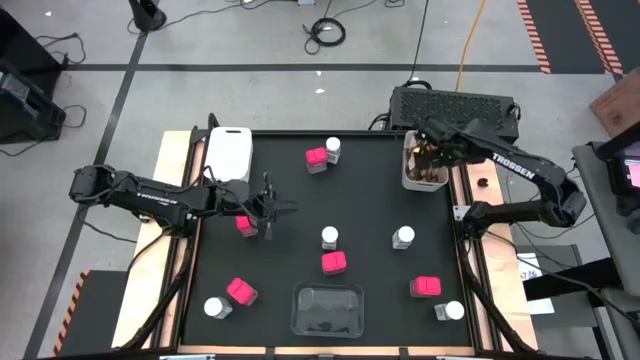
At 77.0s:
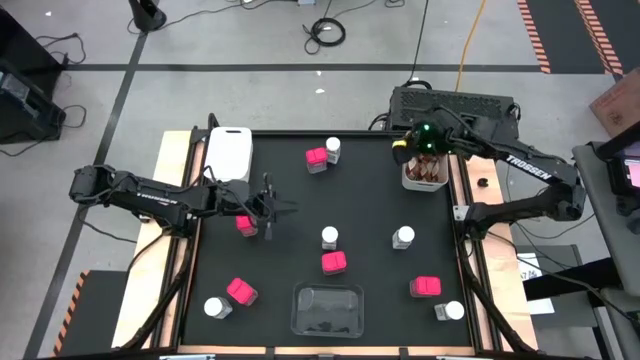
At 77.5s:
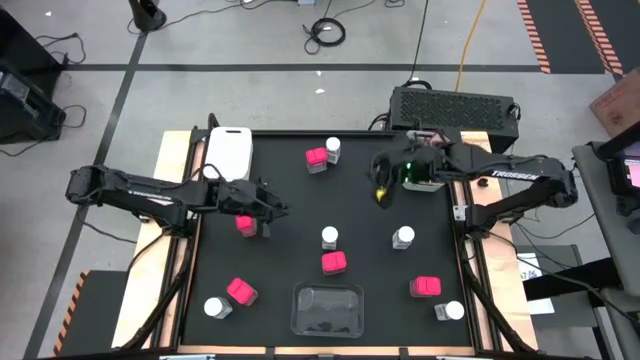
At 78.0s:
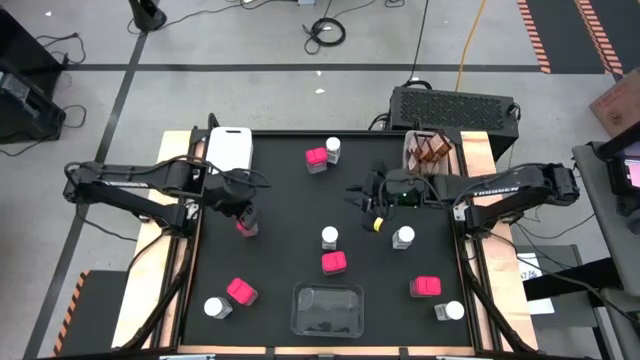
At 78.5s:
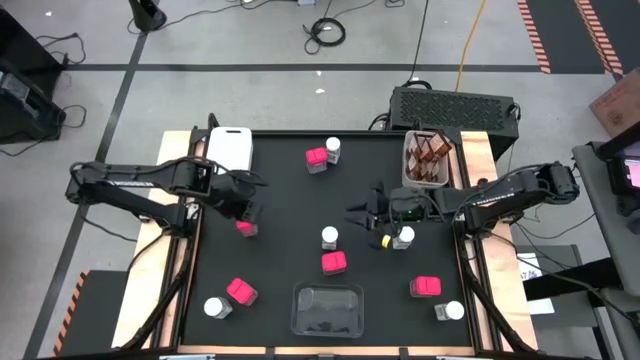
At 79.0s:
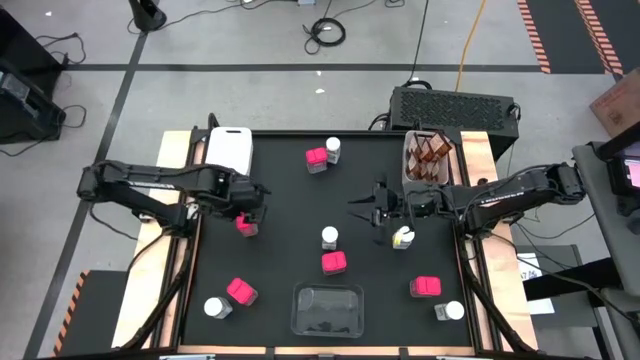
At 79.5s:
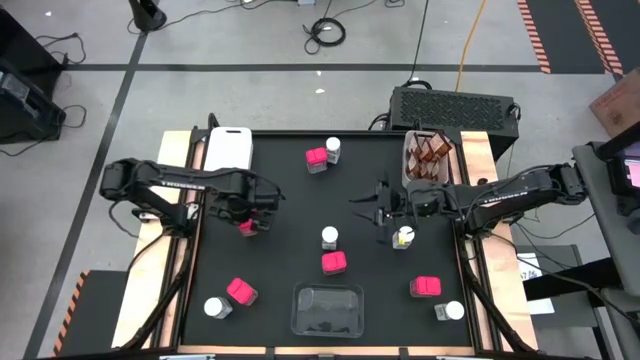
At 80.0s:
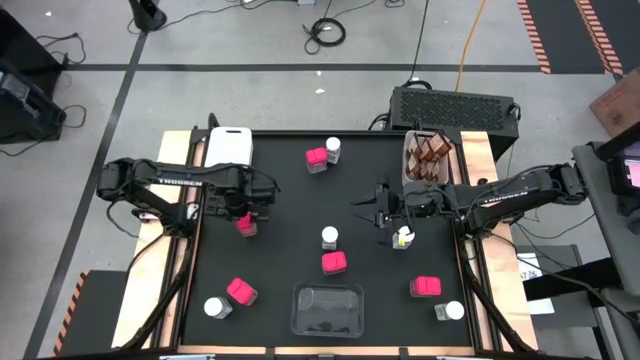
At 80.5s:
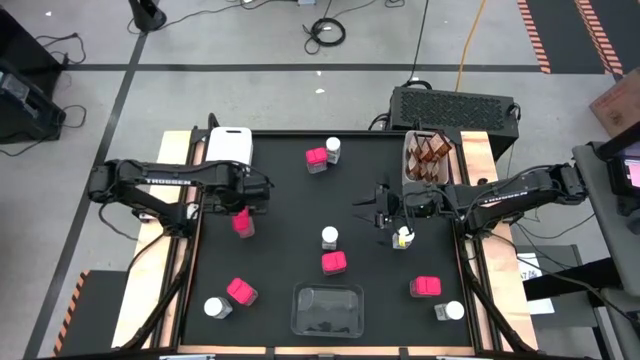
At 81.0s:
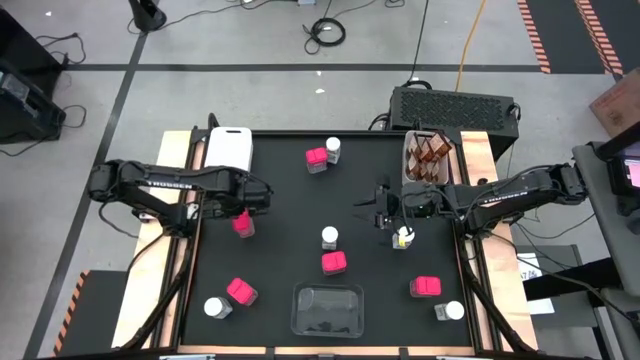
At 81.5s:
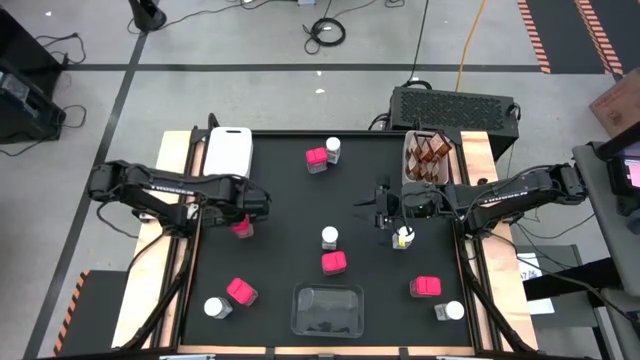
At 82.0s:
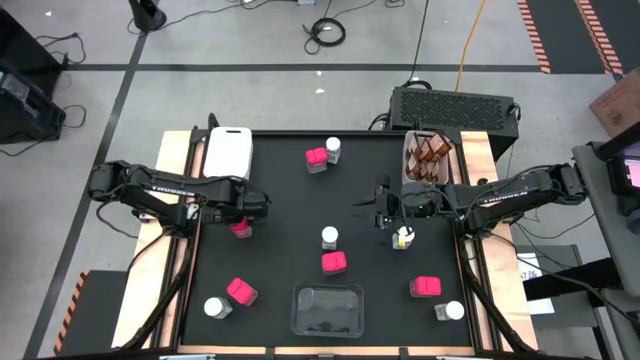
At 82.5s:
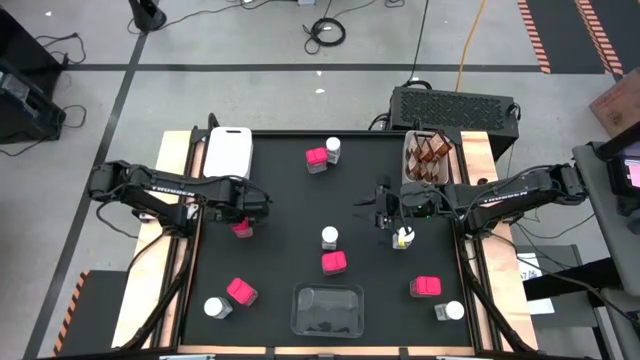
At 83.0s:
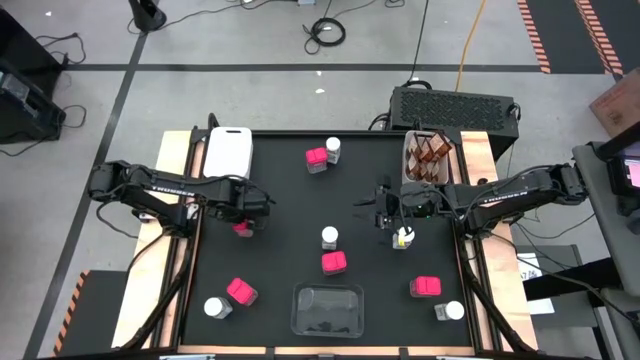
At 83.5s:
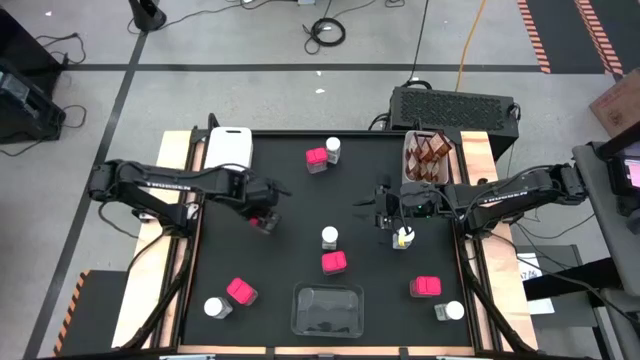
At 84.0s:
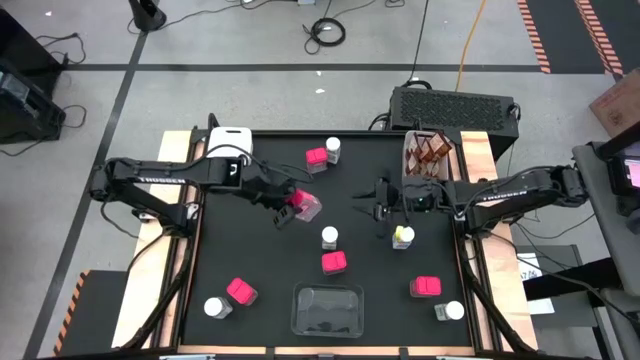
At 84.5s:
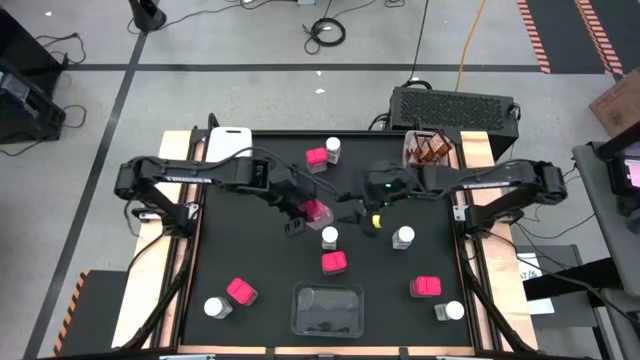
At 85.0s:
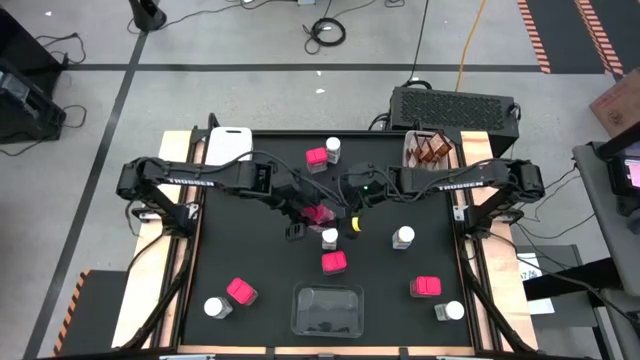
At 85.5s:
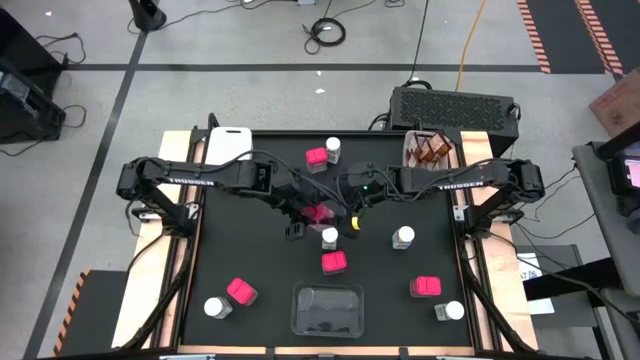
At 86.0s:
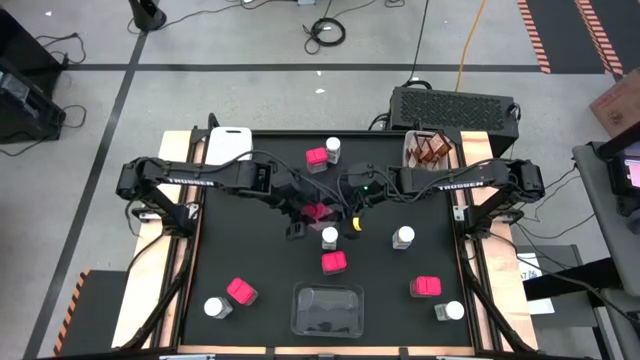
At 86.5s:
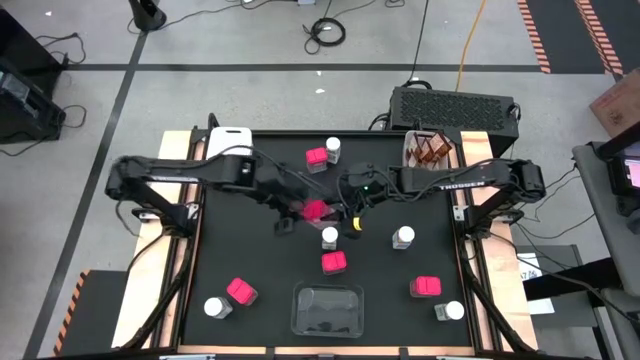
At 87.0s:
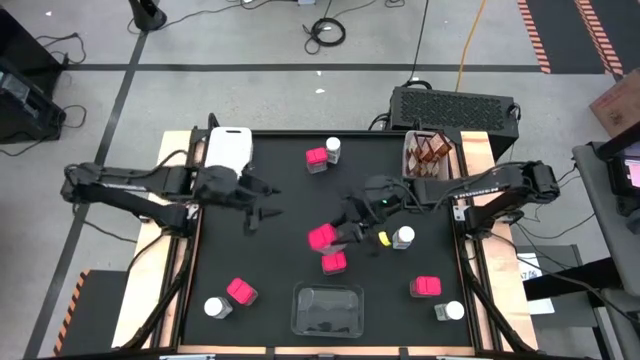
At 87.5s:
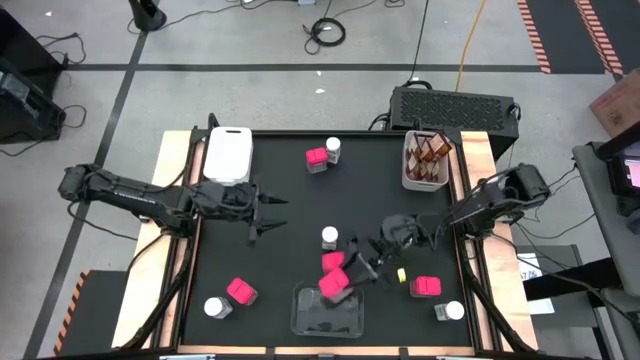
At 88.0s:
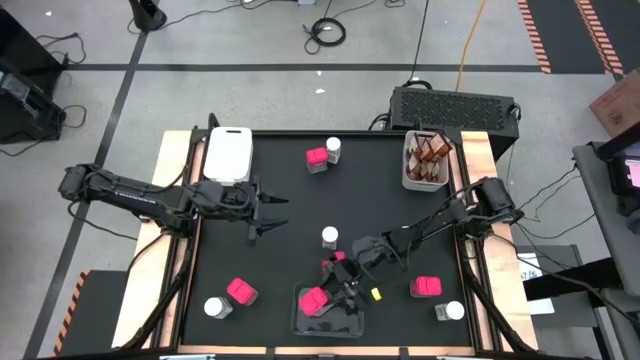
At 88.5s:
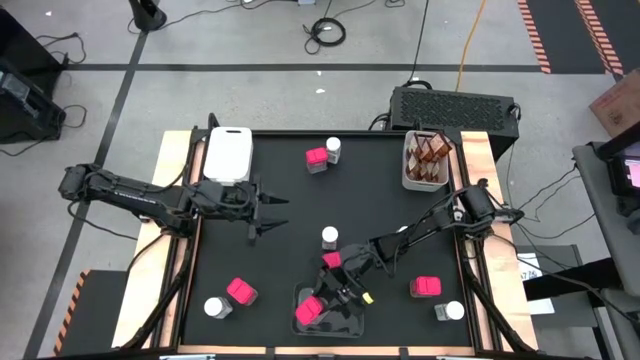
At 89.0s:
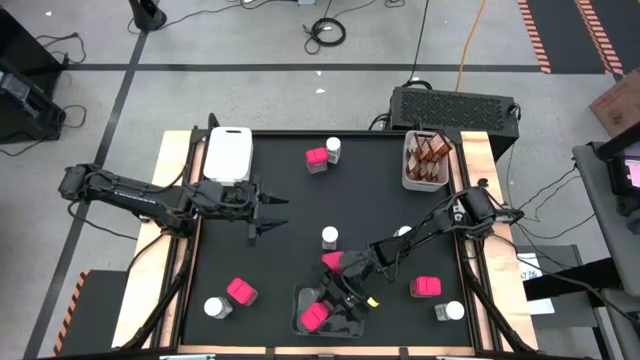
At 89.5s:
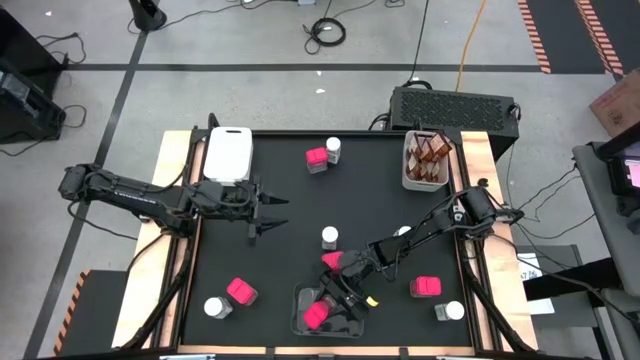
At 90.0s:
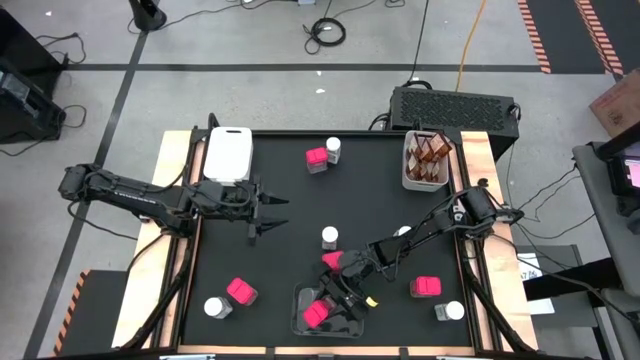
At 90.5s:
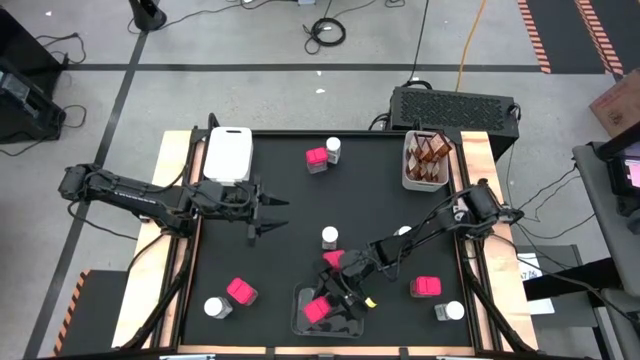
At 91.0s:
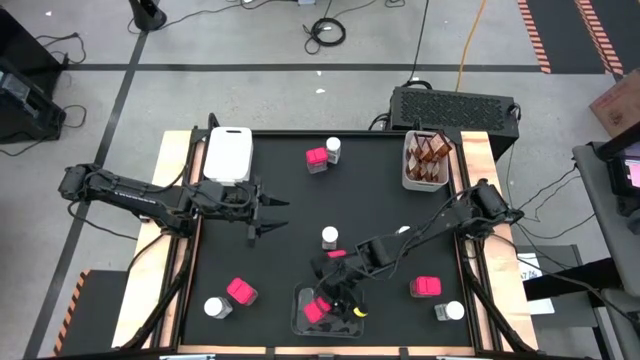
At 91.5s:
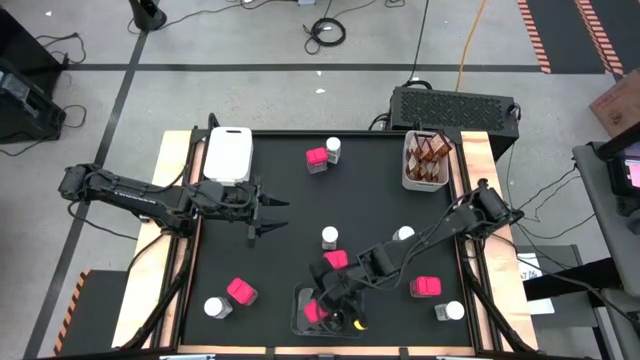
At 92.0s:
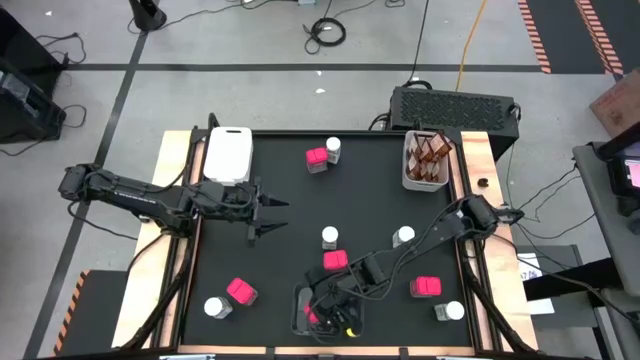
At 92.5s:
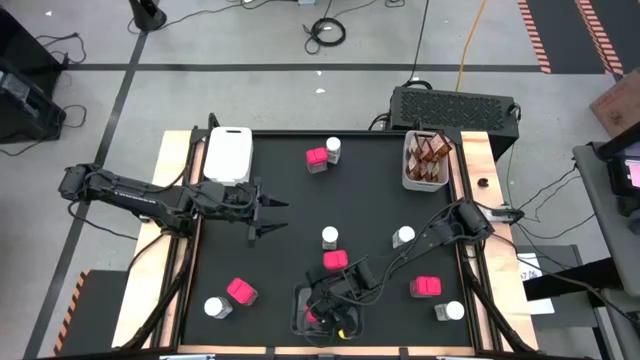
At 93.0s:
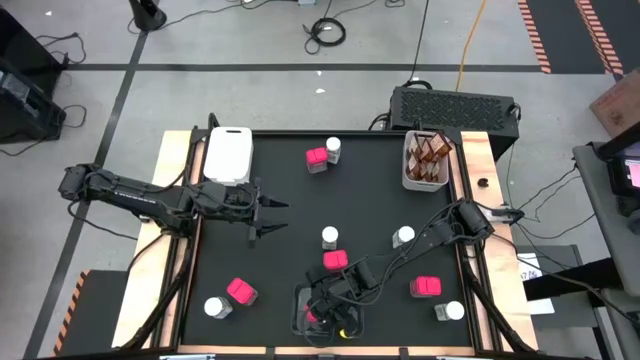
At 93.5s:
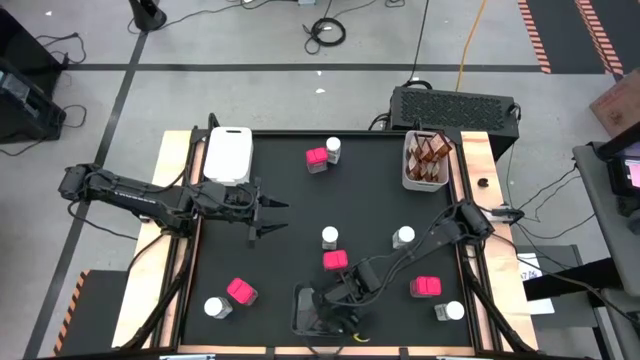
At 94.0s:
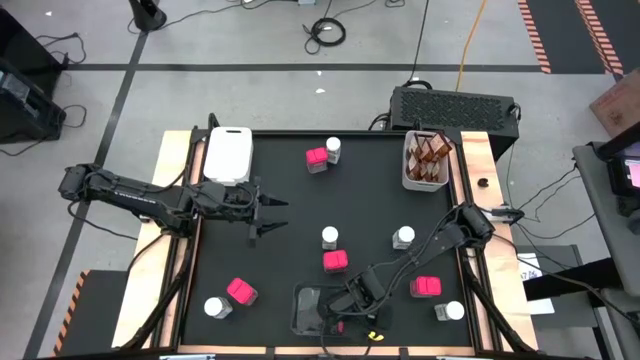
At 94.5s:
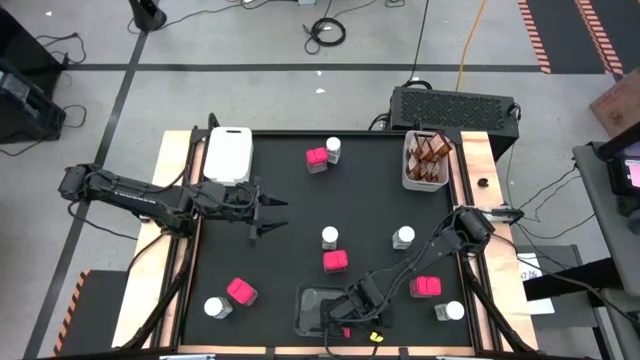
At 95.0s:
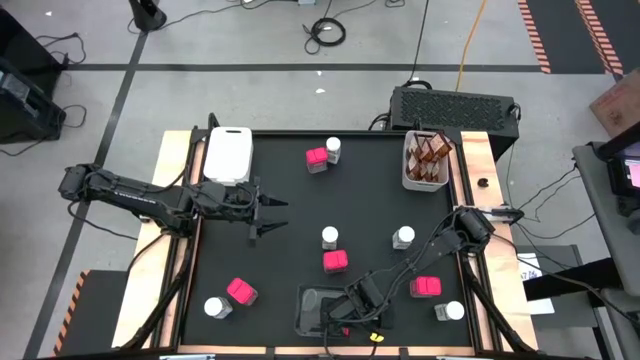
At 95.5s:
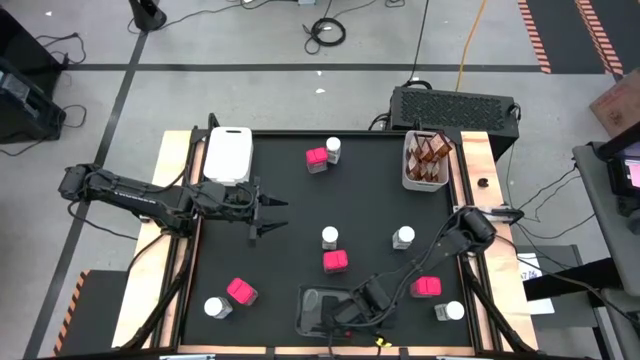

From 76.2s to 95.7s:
Task: Sort spices by type
Put the red seasoning can into the black bin

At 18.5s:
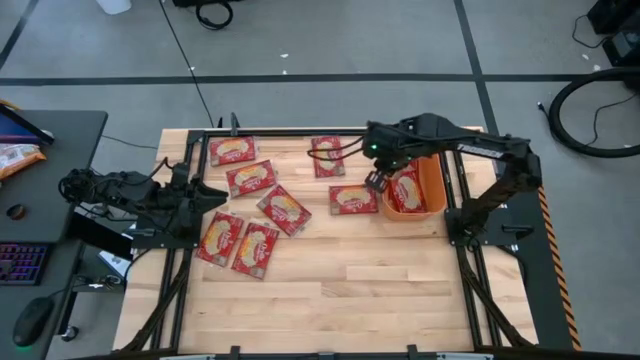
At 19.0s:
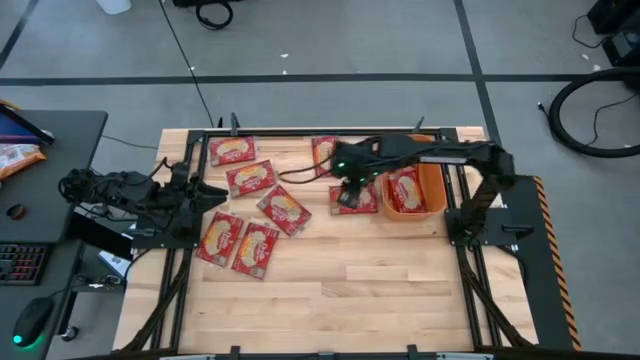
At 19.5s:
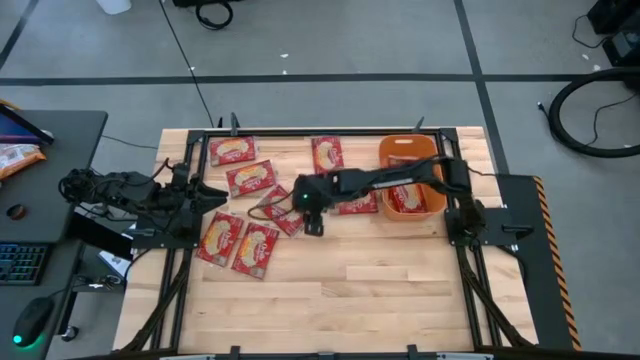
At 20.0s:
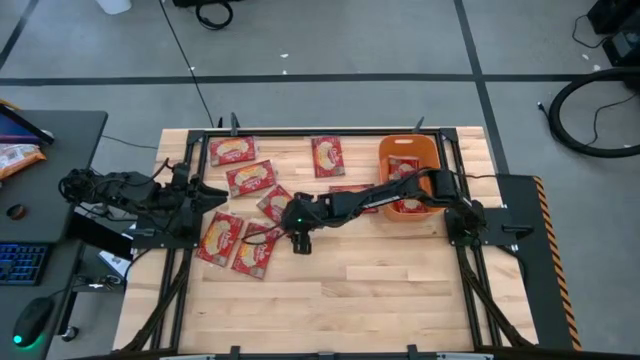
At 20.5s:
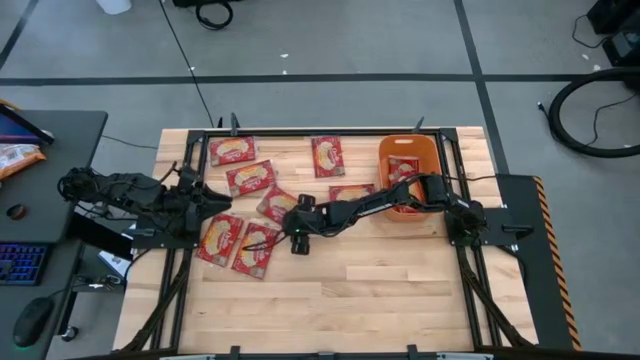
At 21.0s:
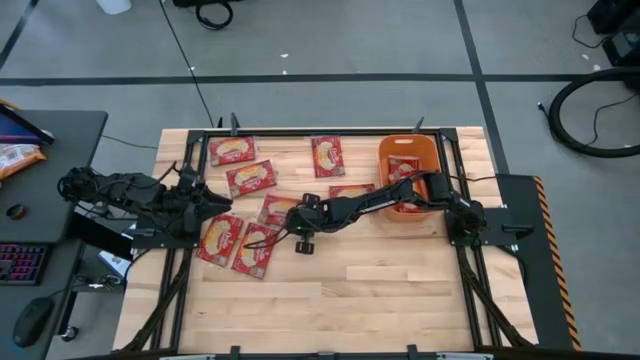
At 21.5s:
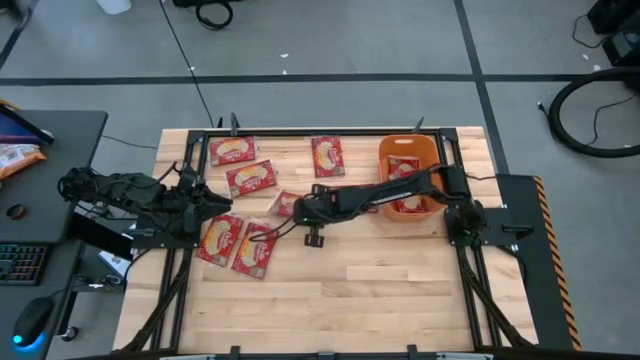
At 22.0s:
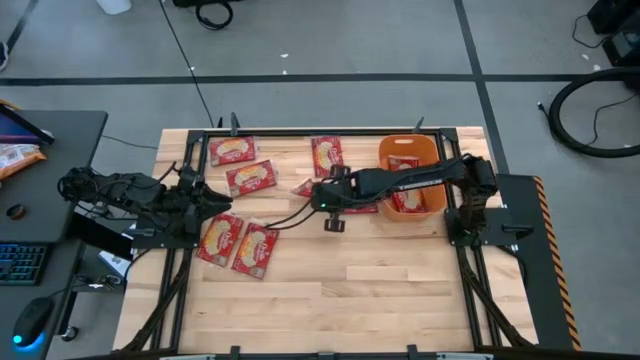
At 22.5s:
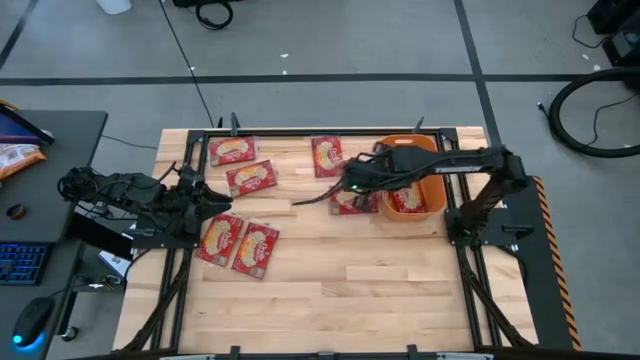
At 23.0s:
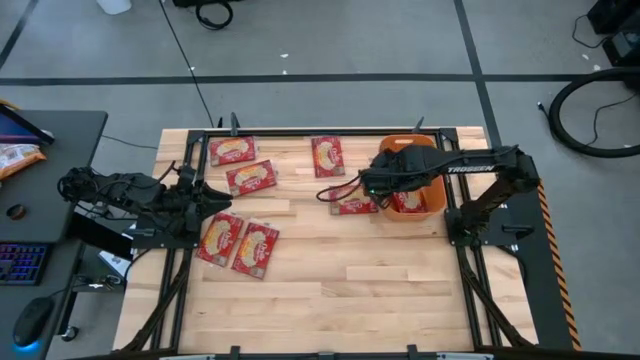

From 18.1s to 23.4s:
Task: Sort popcorn bags into baskets
Put the red popcorn bag into the orange bin
